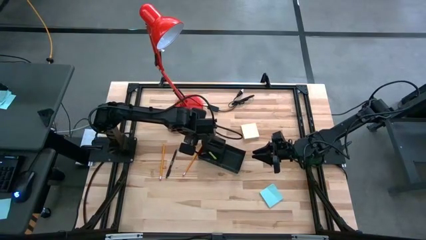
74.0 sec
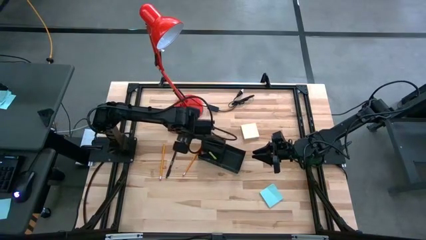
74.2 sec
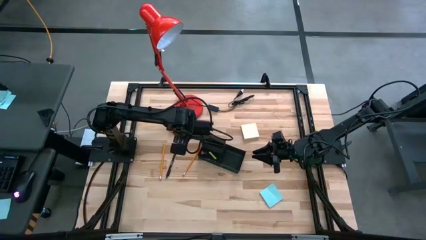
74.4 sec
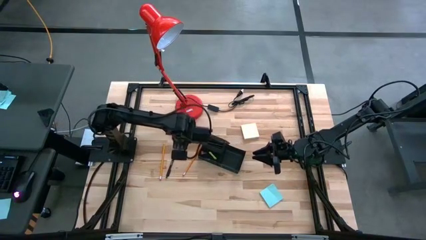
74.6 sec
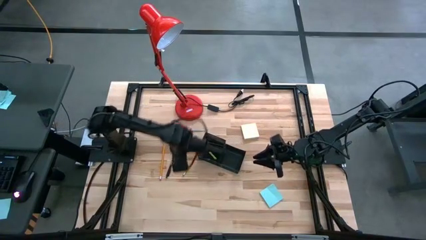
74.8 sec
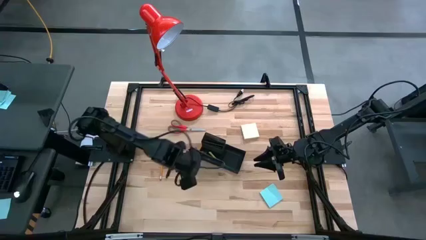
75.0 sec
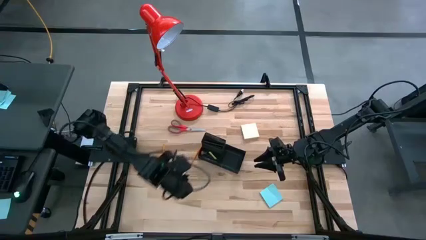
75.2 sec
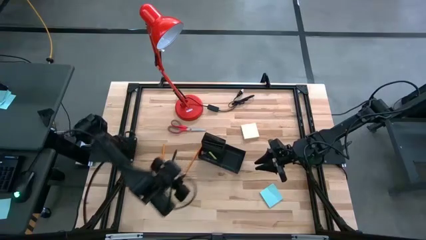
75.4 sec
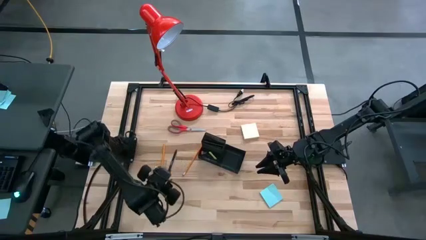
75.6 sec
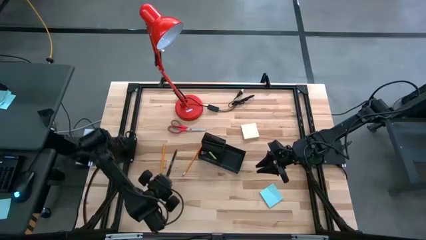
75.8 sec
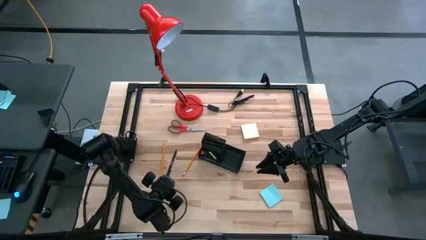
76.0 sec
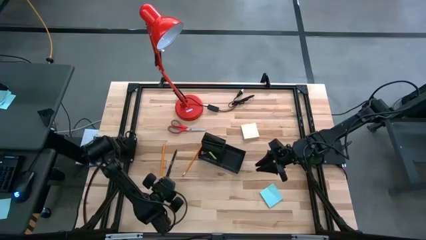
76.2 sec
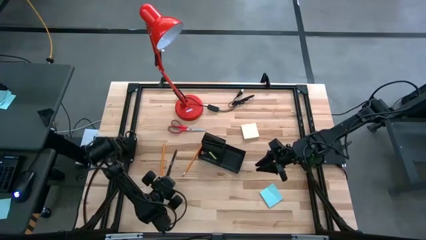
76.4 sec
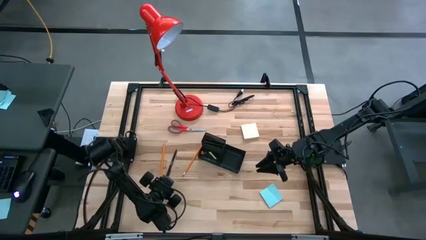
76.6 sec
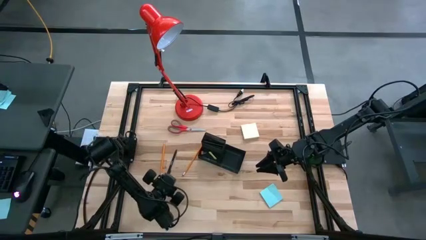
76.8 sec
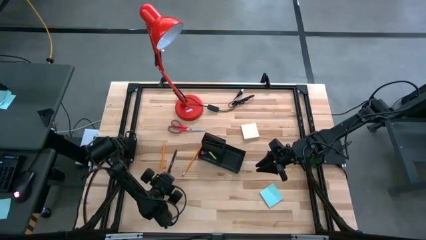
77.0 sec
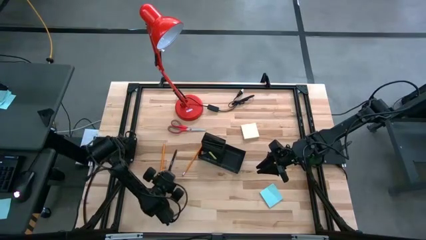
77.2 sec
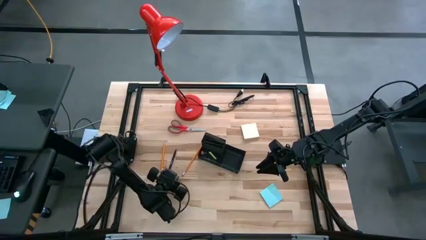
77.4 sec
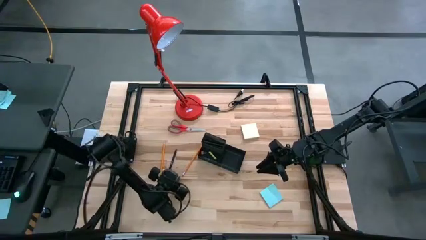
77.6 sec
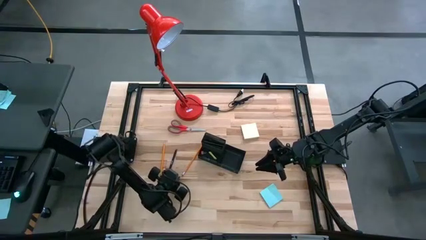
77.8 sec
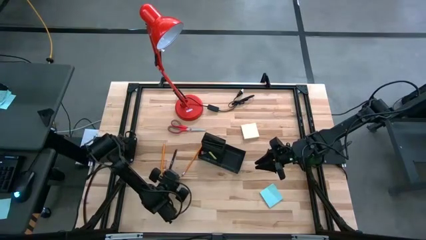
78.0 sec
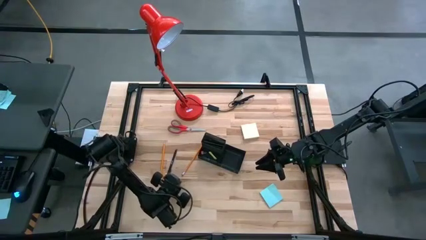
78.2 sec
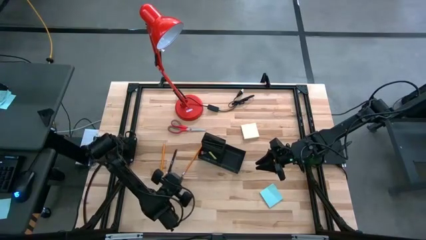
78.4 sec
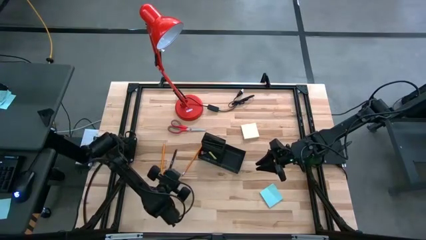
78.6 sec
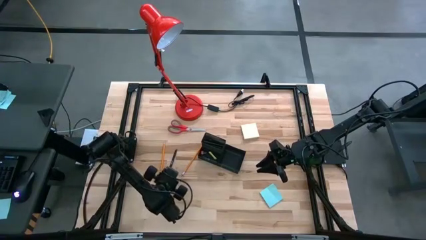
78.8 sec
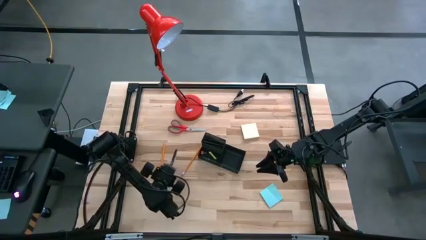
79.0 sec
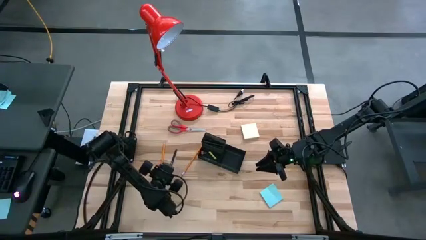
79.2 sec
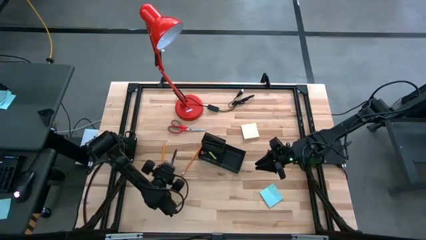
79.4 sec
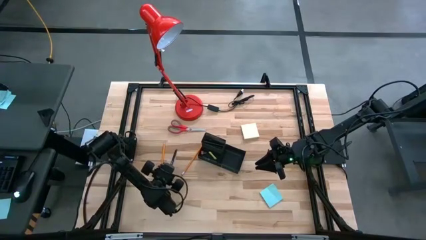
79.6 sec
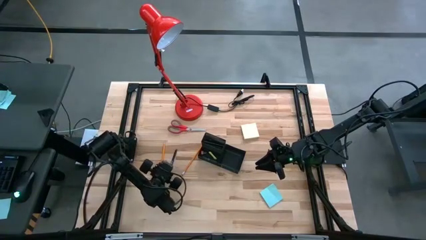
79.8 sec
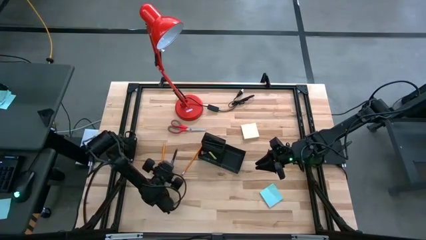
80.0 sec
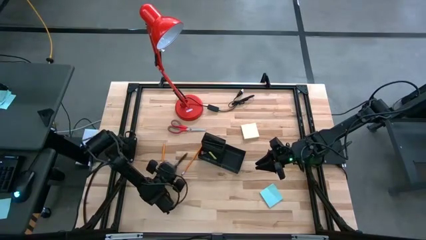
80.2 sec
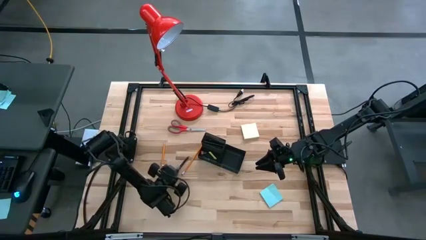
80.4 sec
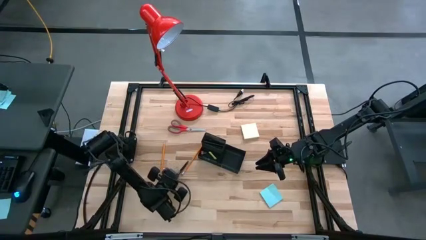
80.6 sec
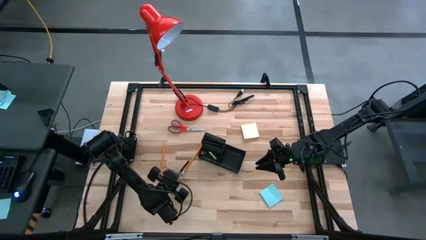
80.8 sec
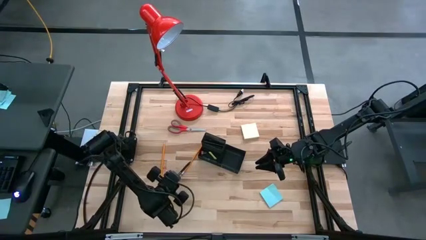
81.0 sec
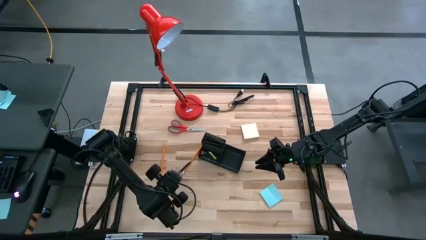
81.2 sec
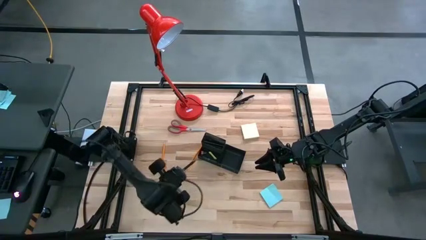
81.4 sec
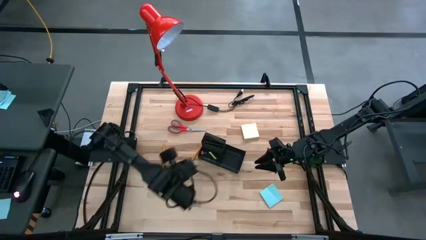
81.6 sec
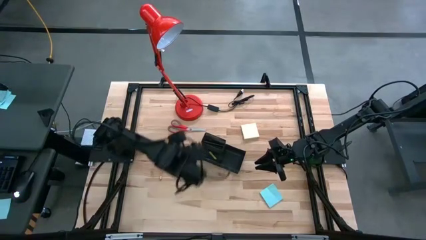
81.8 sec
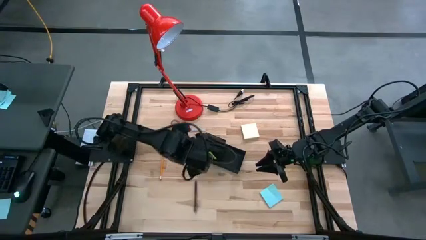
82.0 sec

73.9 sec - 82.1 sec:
Task: Pick and place office supplies into organizer
Put the black pen into the black desk organizer

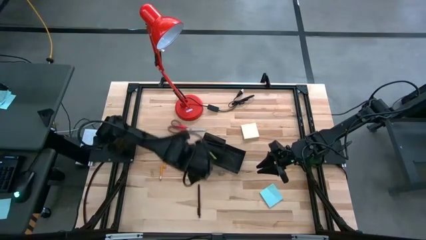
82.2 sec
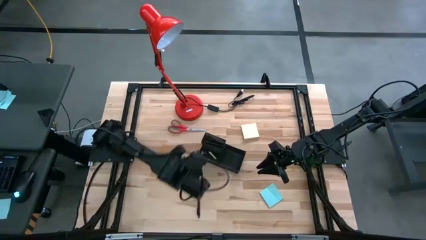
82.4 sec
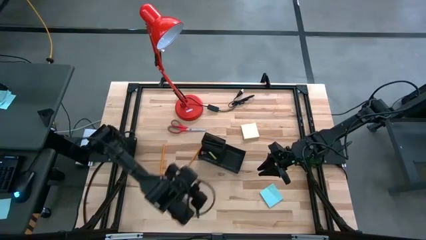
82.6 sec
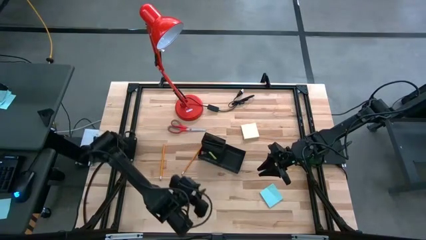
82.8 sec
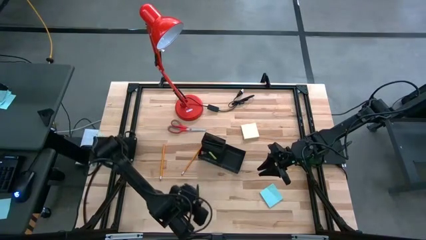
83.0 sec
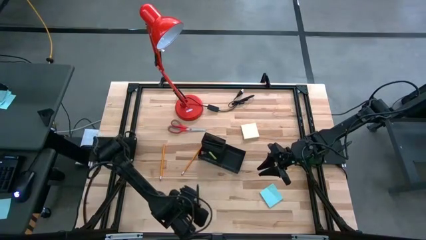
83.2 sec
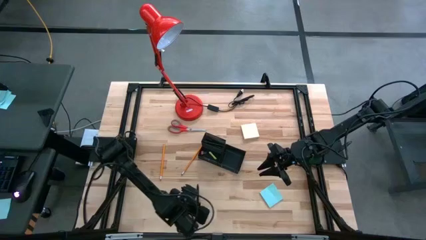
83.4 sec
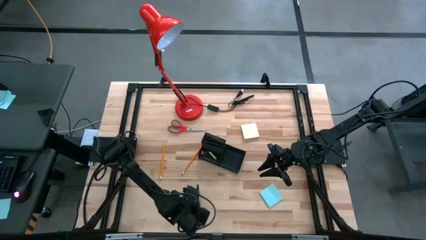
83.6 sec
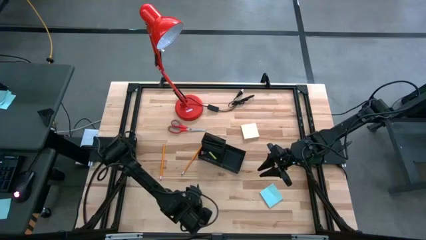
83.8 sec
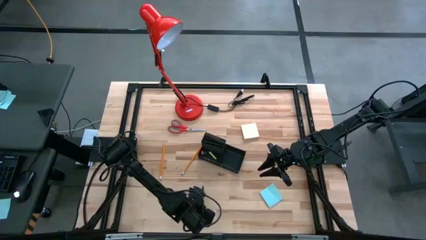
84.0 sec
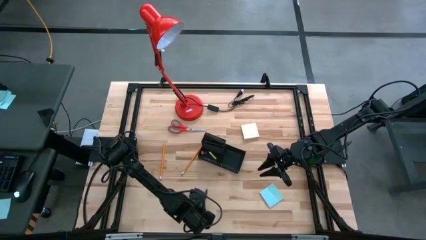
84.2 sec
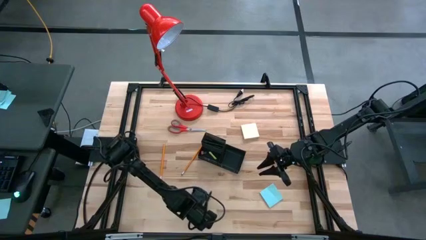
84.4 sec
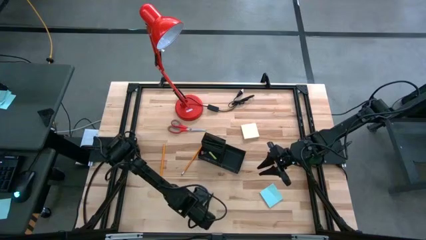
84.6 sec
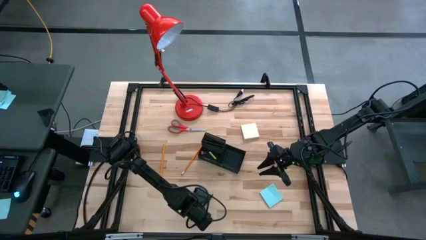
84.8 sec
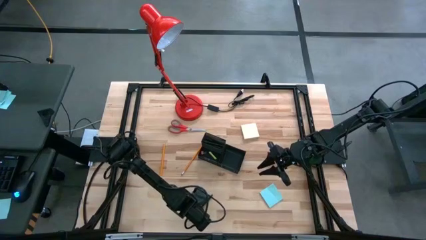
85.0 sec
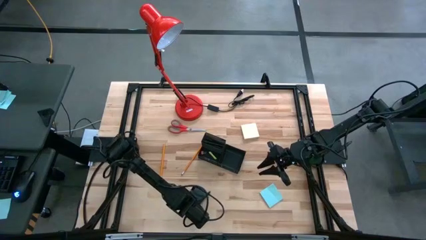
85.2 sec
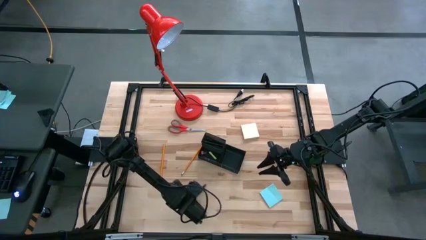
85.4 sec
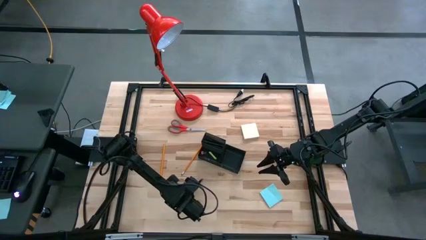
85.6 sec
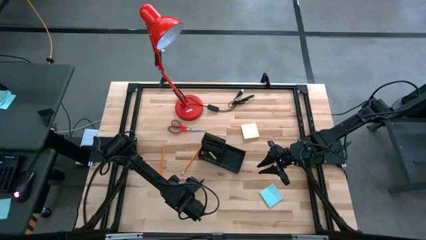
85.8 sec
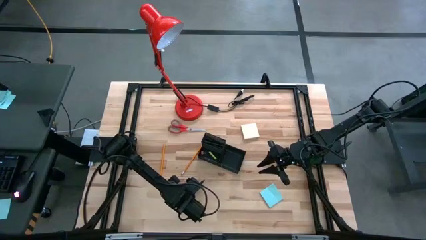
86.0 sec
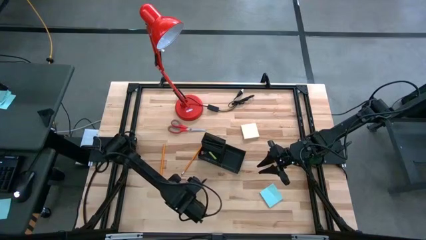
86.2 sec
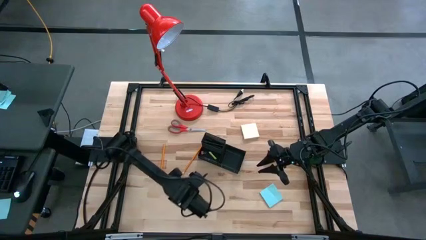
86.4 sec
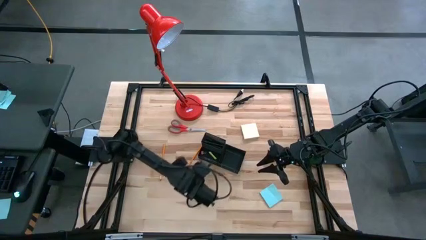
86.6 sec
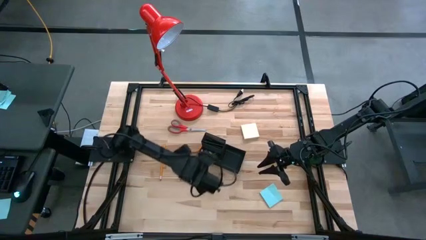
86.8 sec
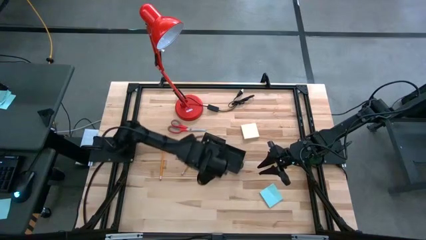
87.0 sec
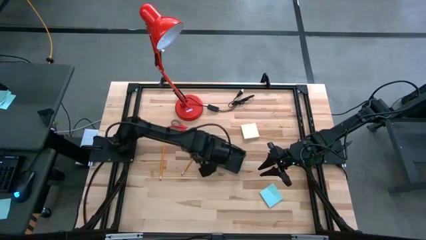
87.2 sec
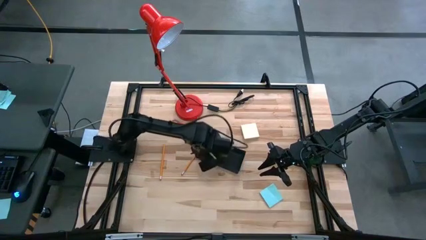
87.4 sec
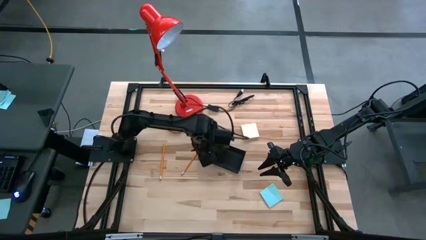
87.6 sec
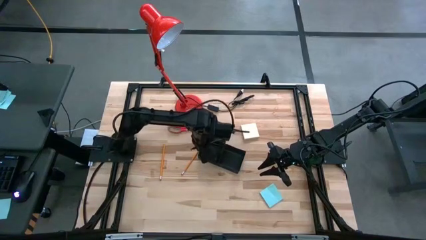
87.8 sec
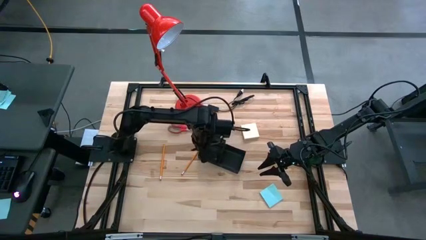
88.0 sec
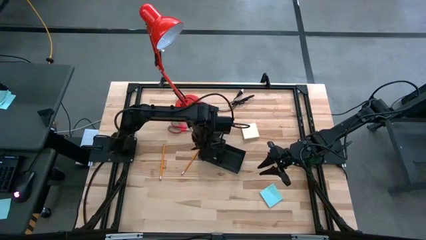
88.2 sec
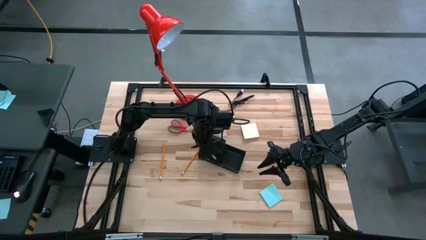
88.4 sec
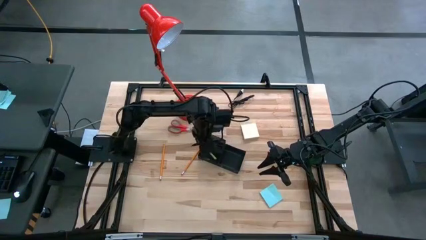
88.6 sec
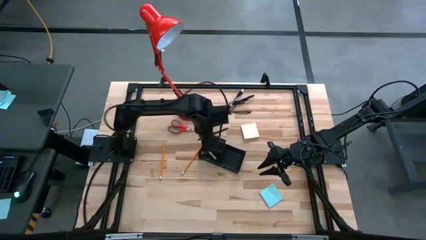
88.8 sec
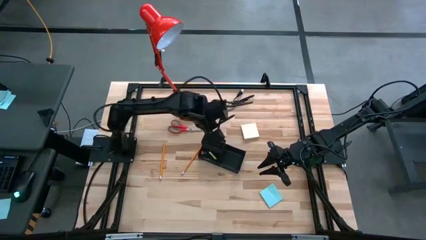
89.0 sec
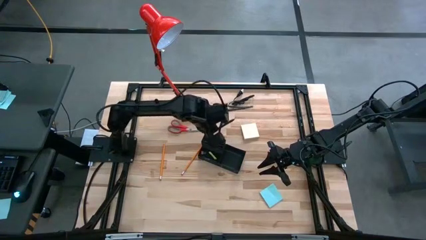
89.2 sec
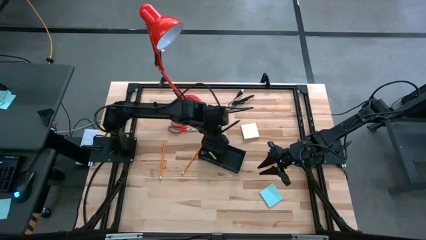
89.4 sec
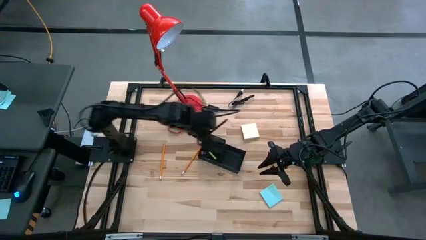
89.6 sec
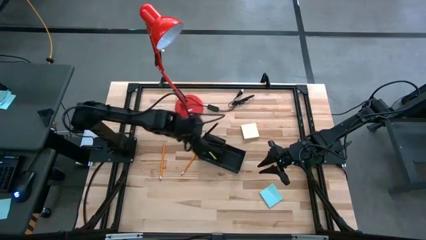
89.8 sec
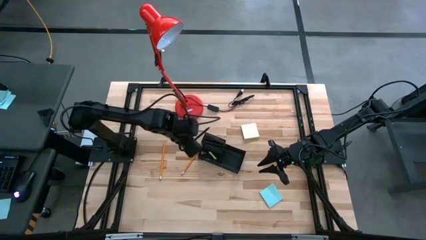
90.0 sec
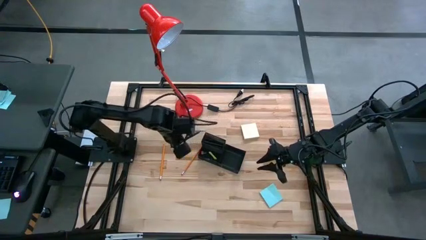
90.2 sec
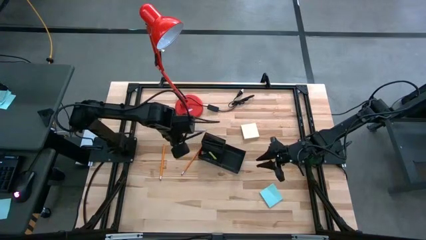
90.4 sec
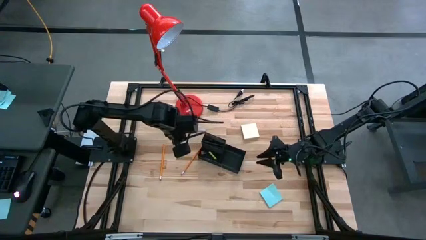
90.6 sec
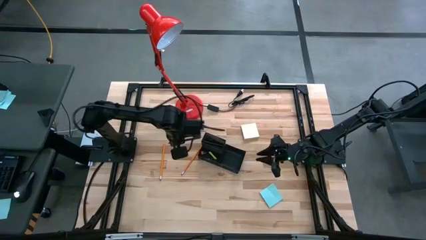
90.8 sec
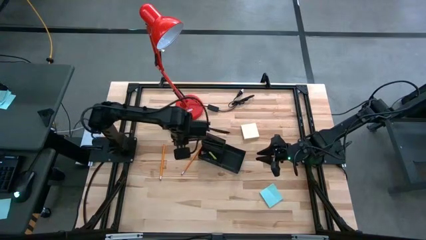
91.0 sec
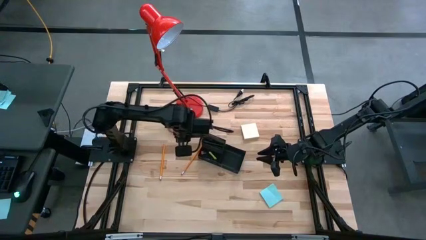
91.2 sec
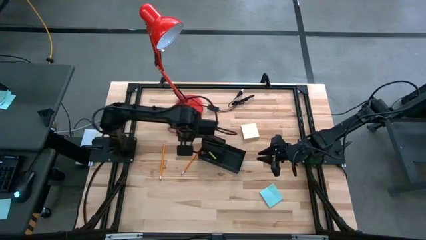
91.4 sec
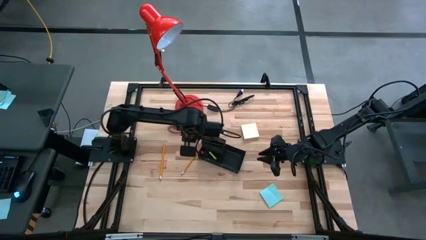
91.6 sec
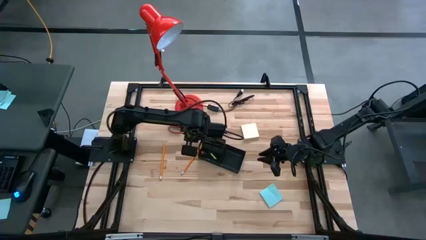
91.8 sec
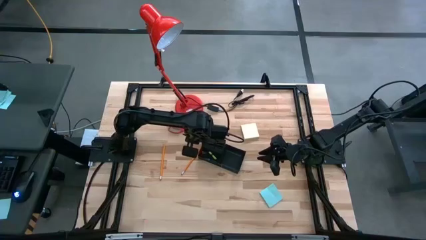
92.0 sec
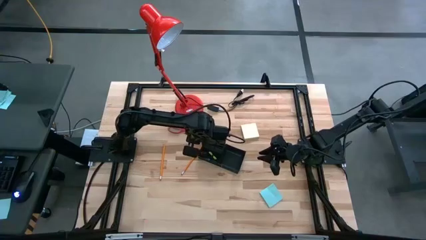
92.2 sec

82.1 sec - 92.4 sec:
Put the black pen into the black desk organizer
